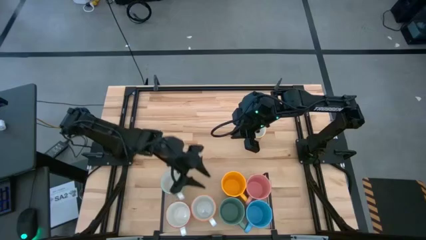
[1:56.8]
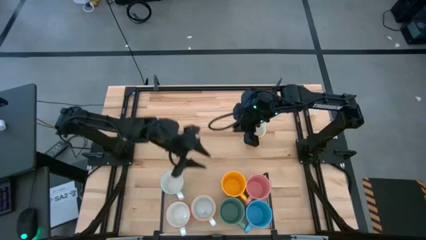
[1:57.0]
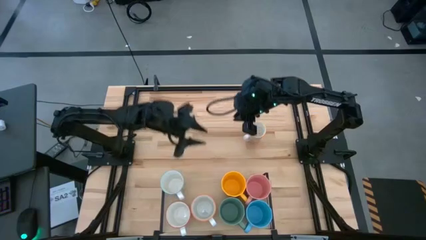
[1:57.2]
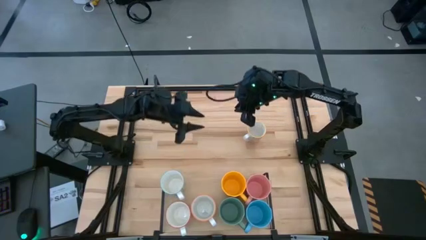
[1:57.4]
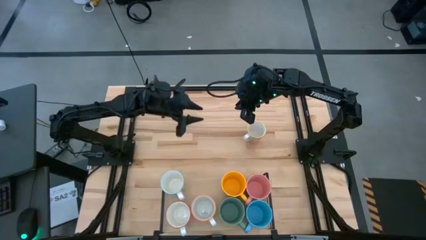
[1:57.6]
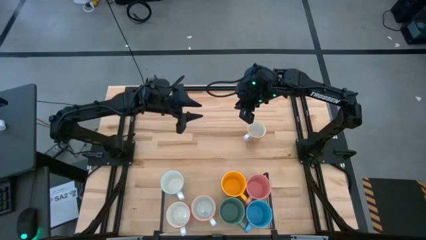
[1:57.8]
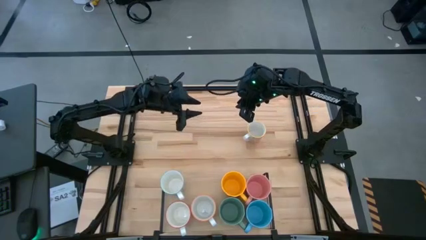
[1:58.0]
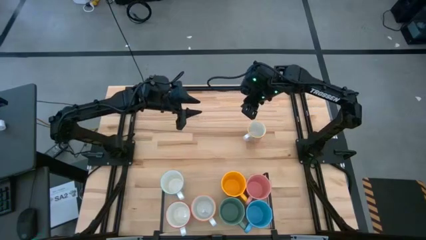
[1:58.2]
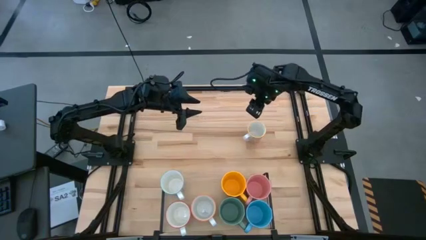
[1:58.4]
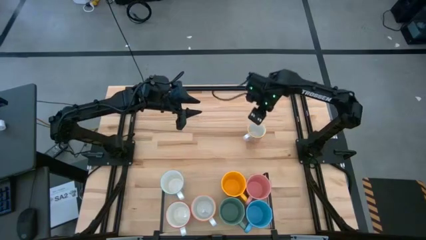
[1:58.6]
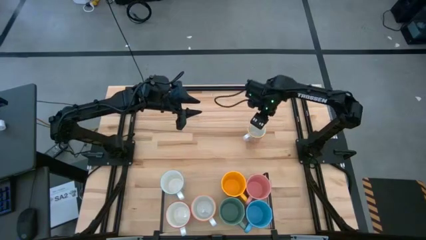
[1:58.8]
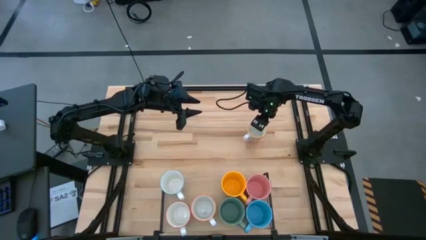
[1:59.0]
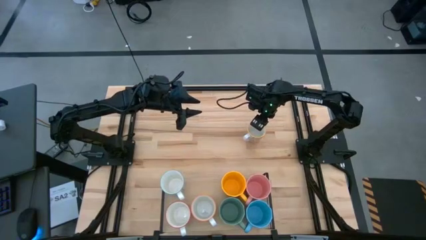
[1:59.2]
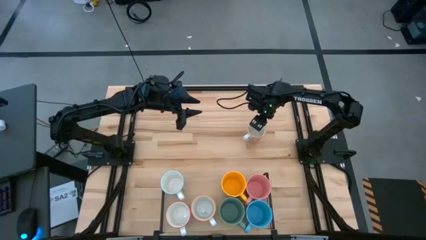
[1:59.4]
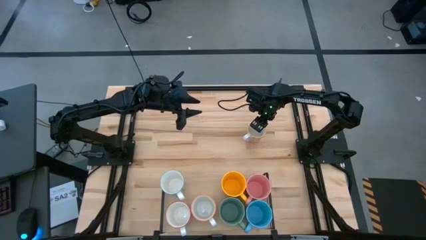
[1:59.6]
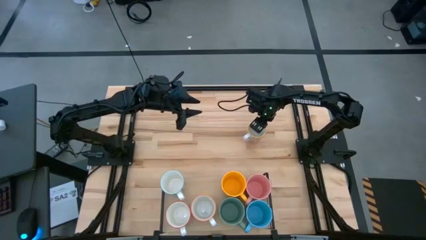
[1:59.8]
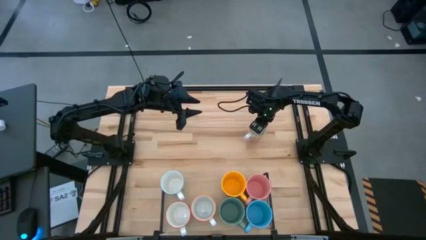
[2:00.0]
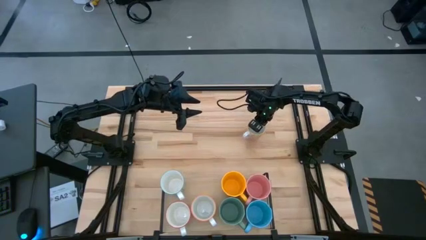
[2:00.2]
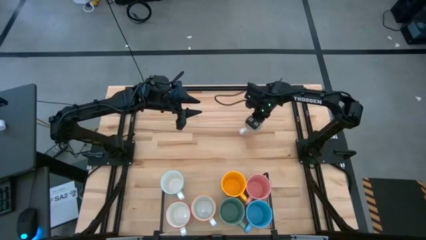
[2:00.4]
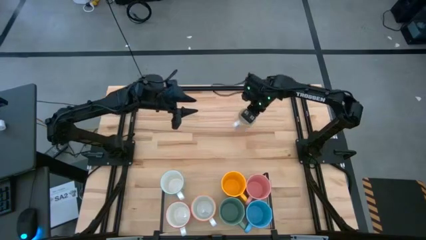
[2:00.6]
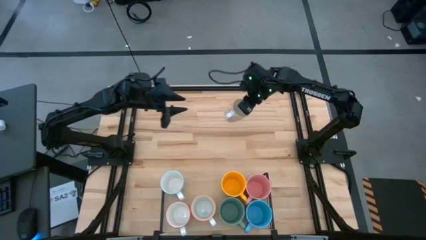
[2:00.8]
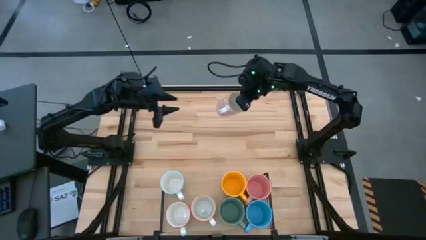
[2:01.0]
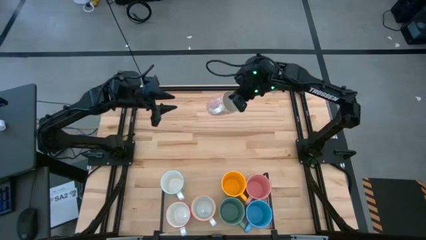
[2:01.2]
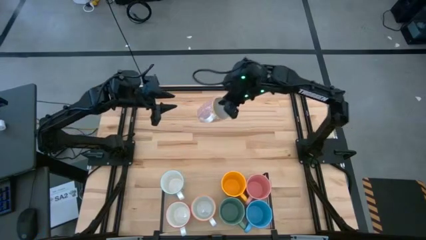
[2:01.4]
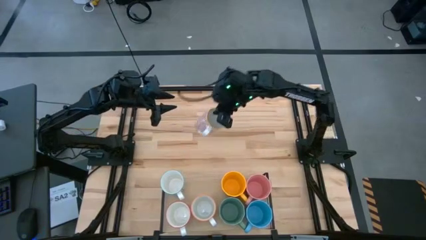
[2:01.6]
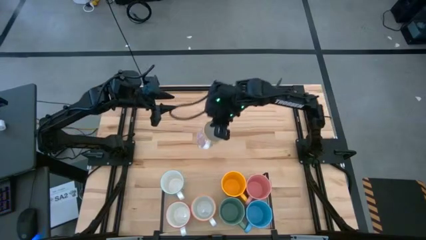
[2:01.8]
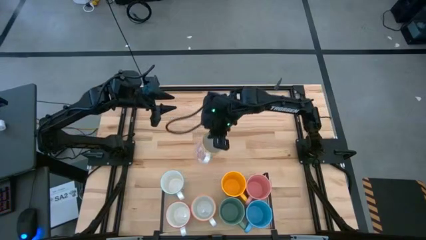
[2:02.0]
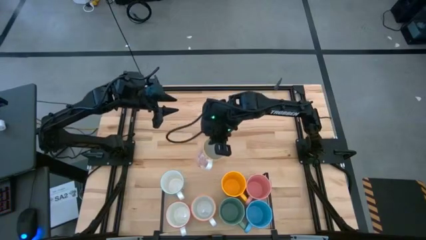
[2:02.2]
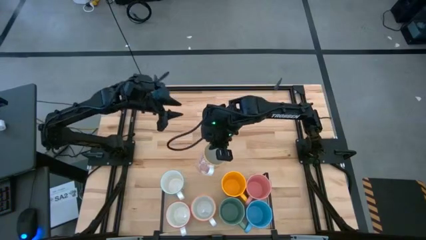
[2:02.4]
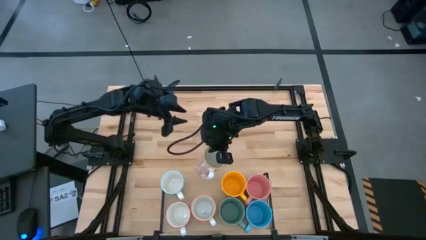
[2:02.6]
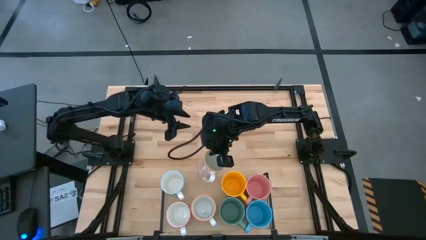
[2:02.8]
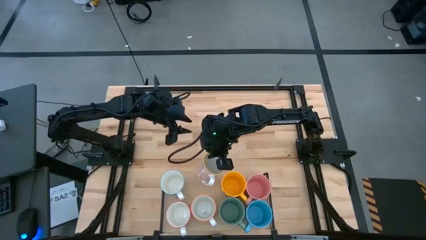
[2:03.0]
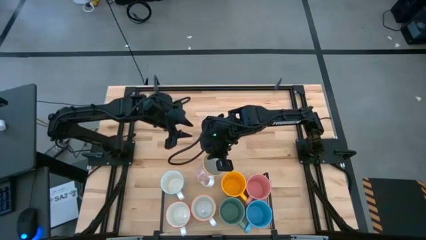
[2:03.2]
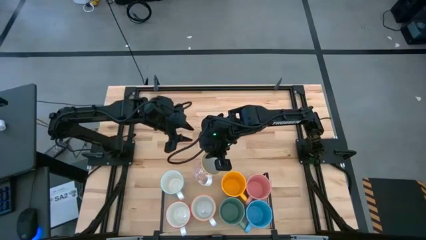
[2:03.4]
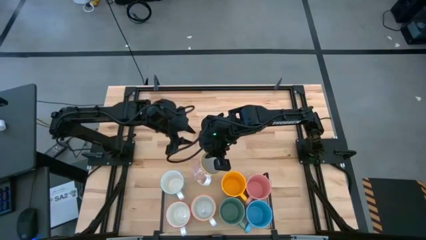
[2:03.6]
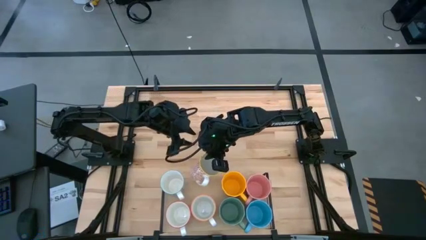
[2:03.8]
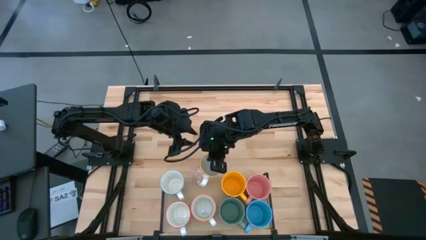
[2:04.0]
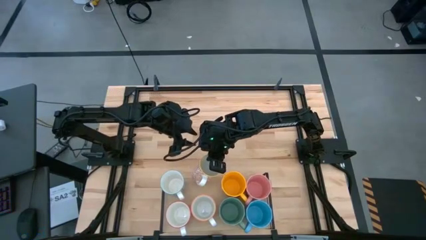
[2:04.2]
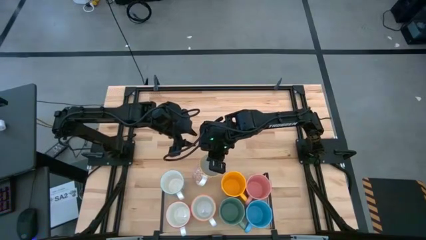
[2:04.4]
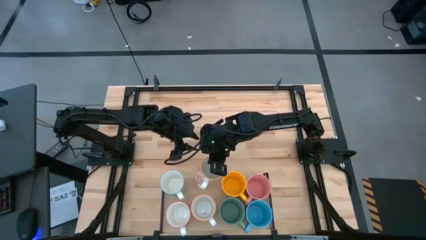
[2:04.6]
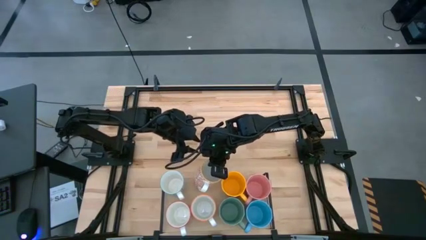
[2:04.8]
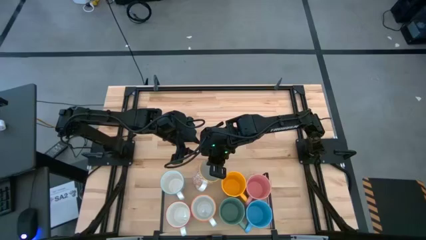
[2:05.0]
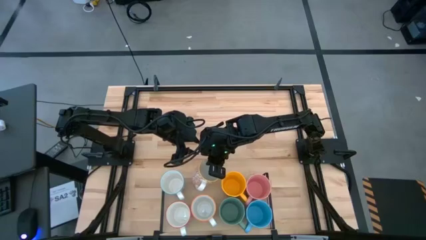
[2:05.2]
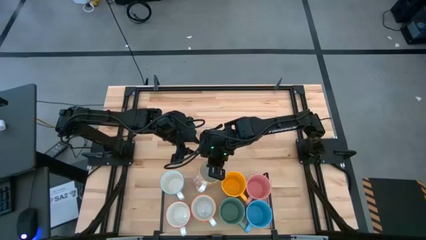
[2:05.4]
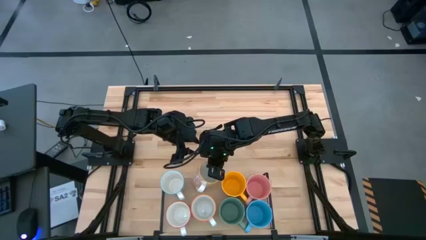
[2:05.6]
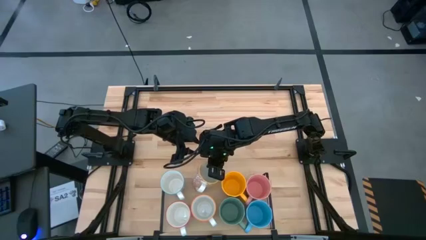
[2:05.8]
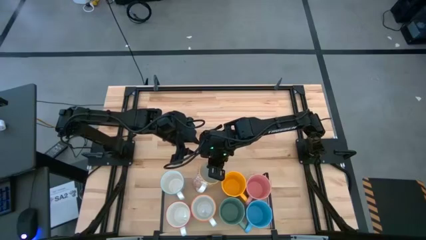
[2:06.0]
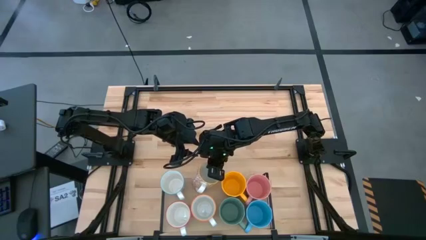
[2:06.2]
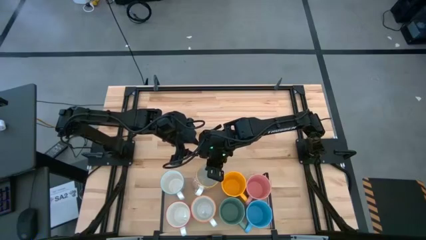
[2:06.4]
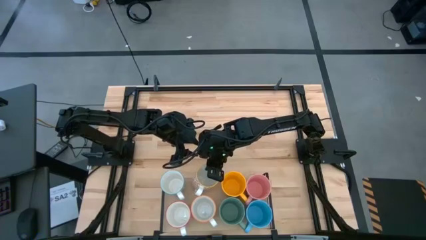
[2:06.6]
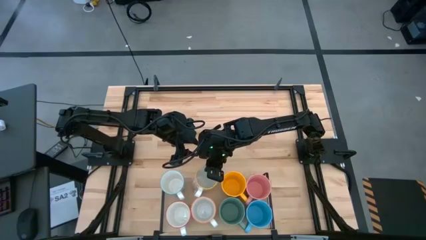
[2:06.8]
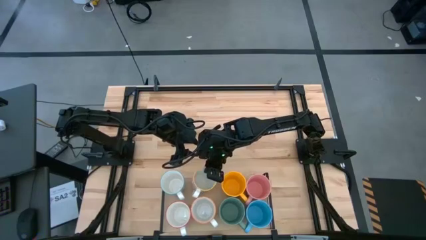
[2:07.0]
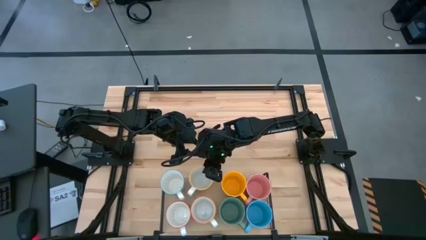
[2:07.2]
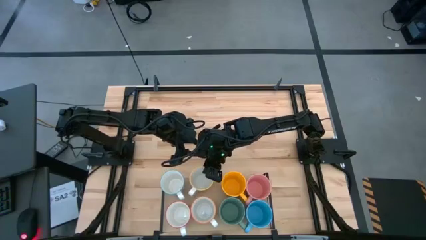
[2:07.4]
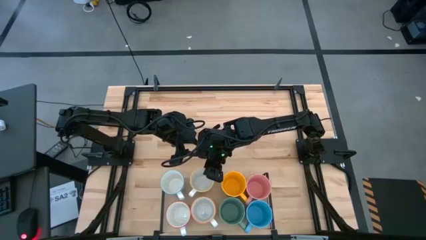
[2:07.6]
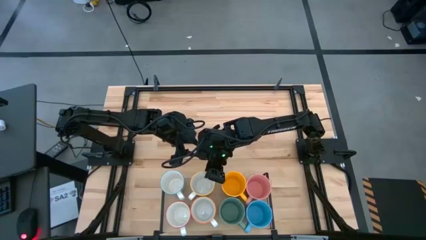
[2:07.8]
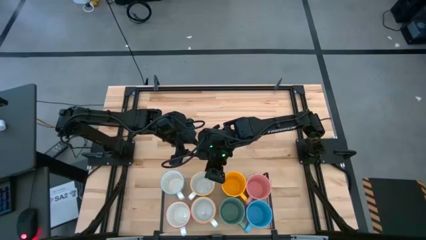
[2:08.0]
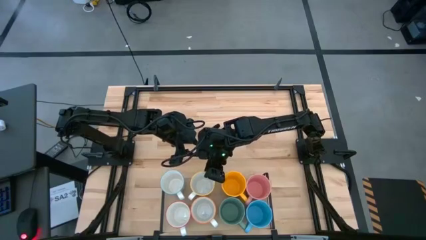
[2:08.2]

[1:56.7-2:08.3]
Task: Place coffee mugs
Put the orange mug on the shelf

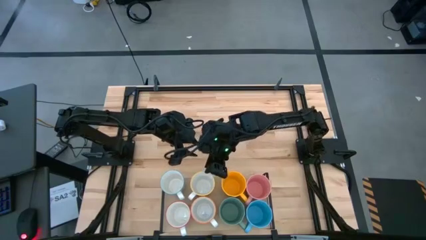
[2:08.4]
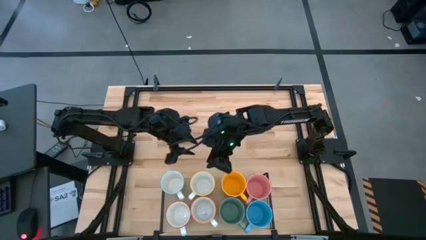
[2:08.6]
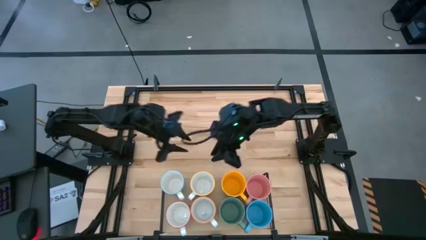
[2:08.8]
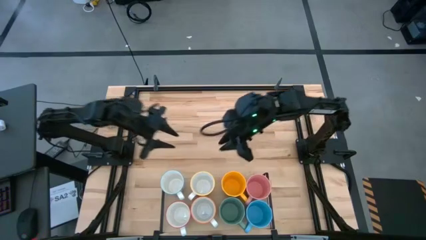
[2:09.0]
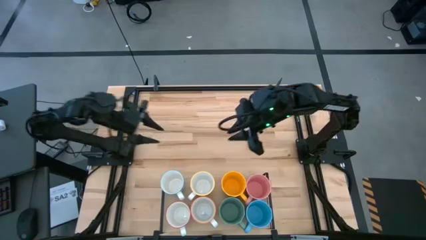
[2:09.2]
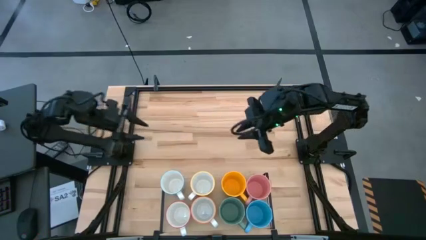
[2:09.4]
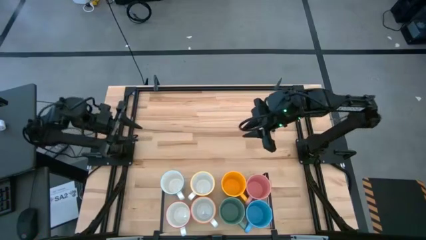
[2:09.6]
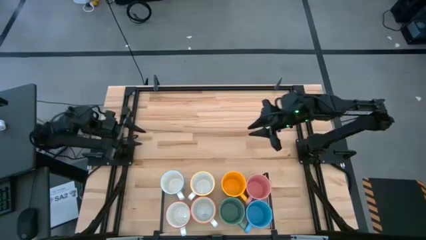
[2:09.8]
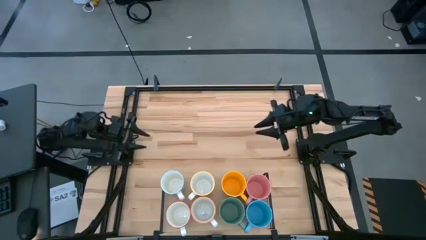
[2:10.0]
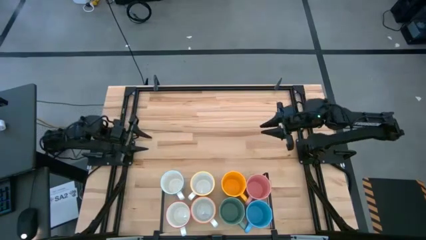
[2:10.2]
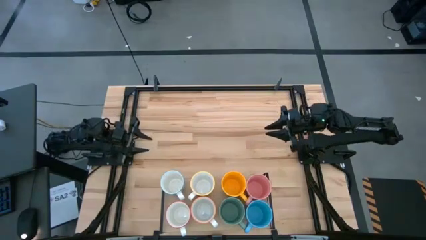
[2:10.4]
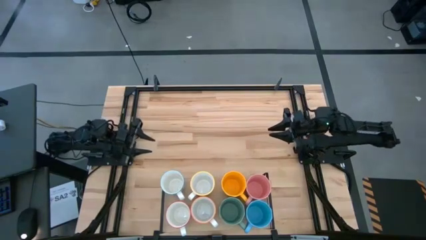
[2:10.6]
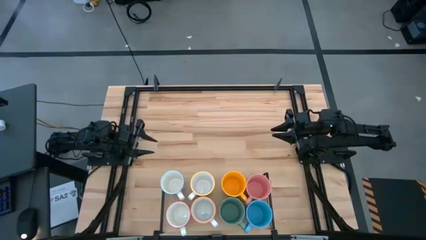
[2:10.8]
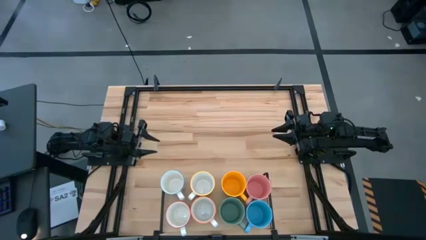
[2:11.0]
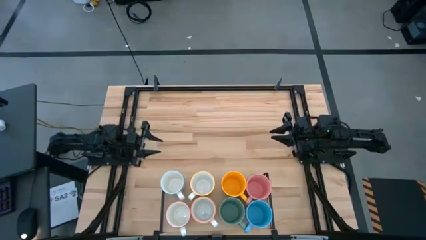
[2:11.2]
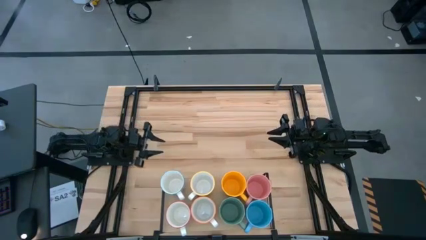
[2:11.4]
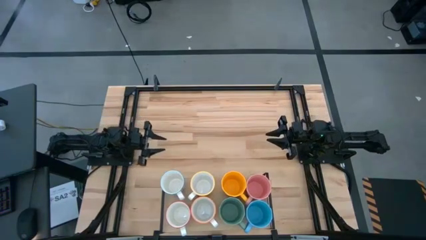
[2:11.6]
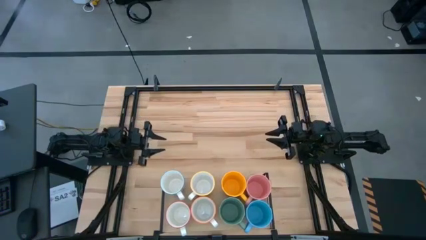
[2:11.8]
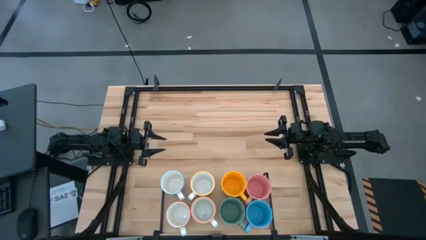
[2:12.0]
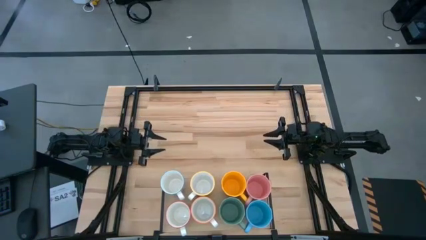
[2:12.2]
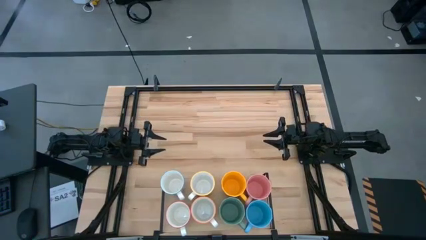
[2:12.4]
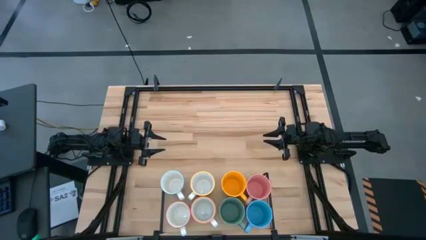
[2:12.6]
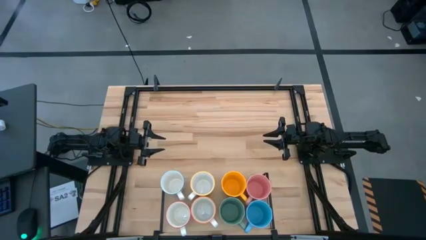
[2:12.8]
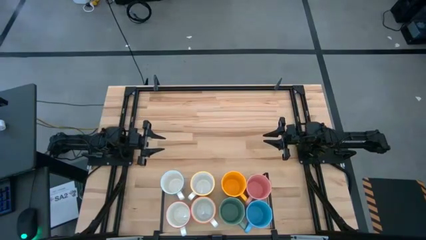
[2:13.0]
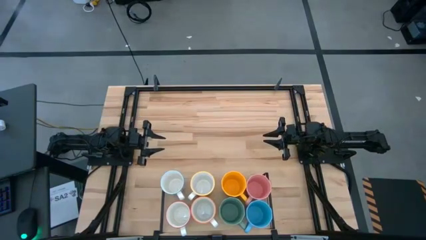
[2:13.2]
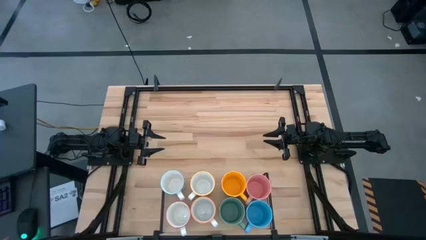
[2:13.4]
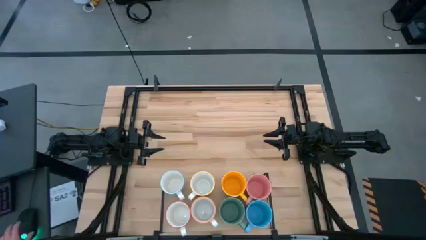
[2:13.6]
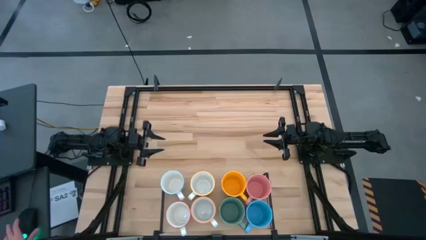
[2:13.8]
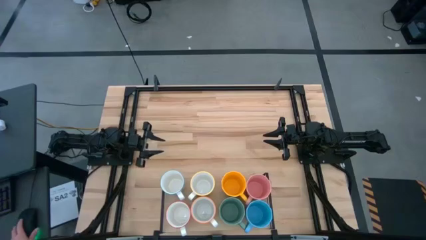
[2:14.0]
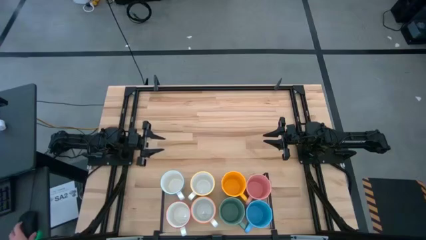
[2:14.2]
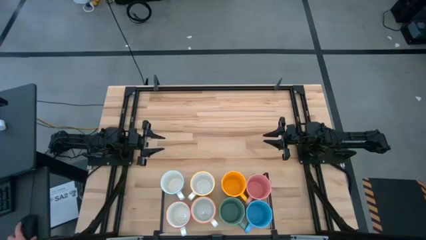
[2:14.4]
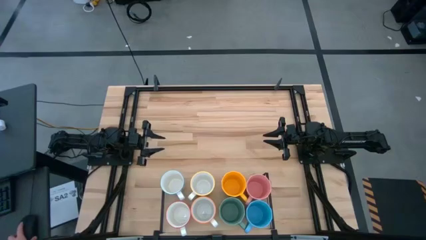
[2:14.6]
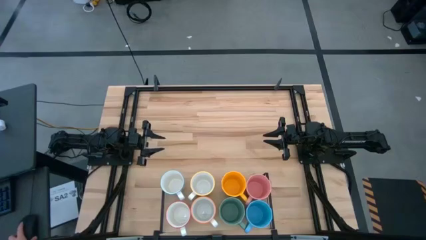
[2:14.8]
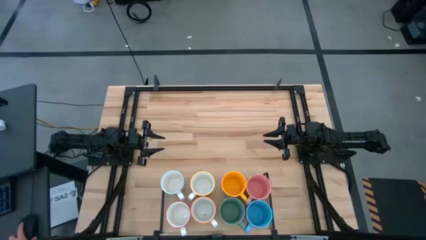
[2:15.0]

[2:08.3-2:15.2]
Return to Home Position
